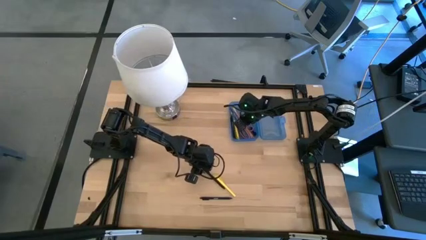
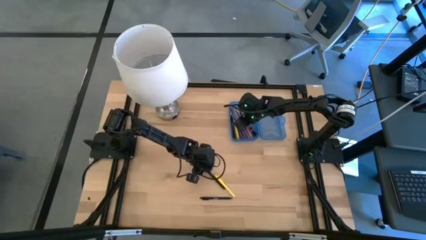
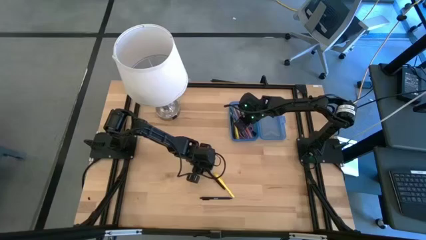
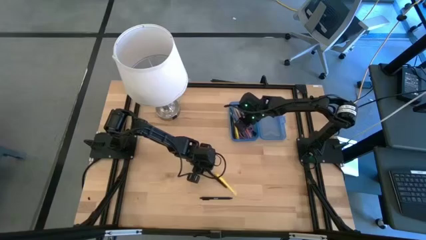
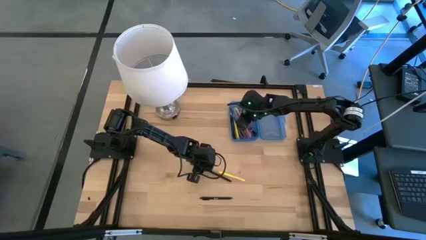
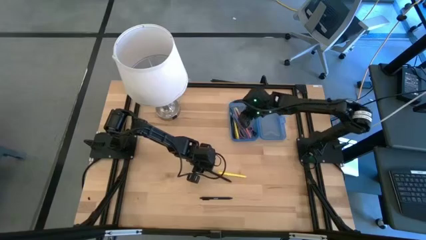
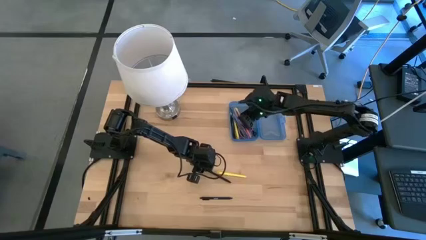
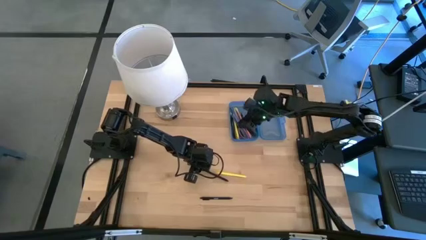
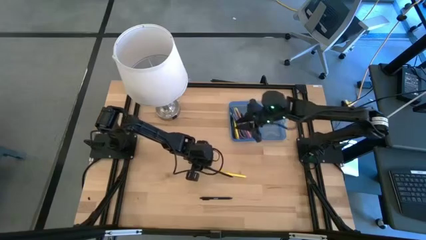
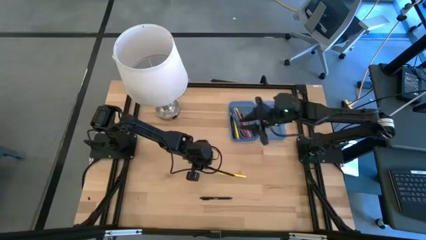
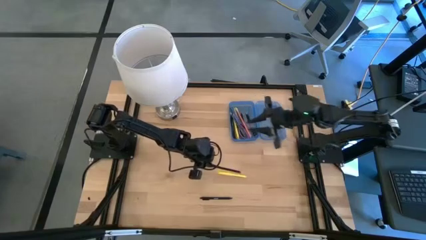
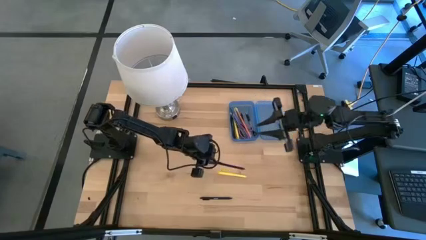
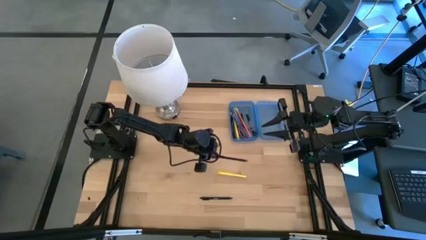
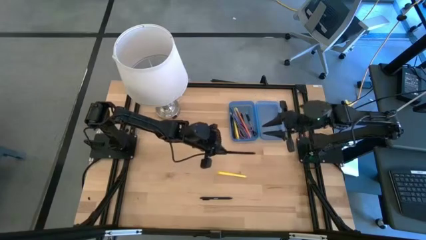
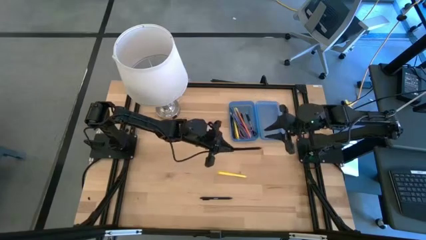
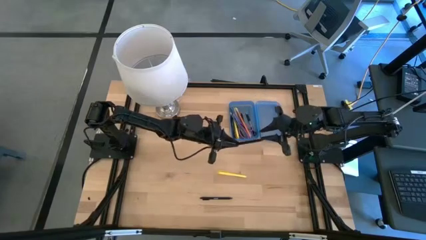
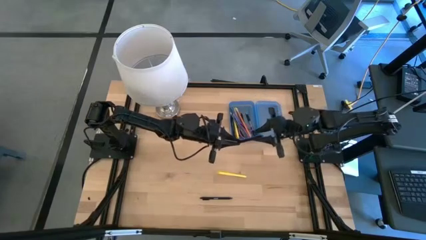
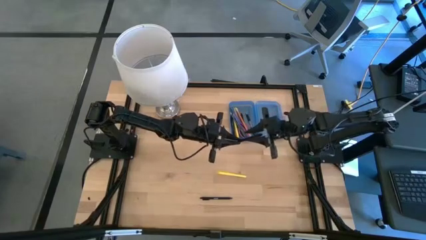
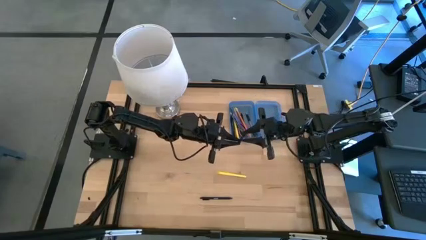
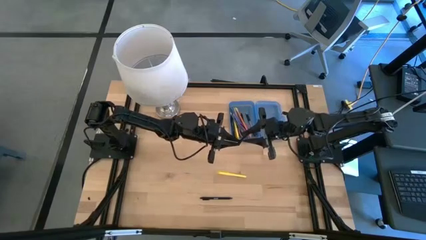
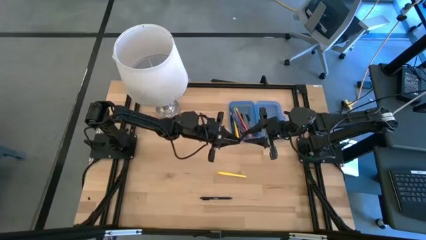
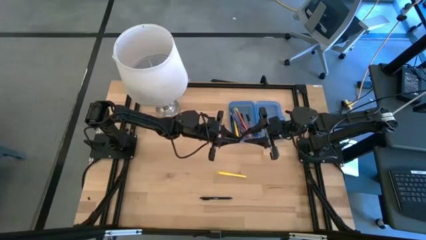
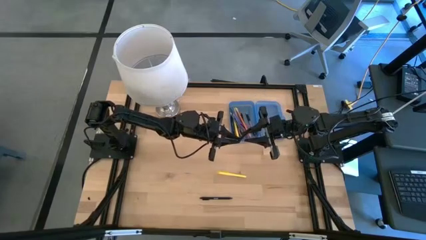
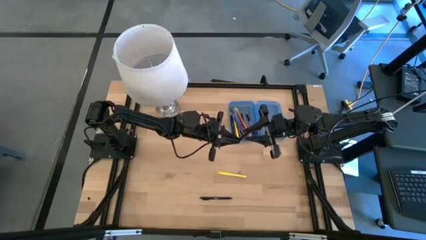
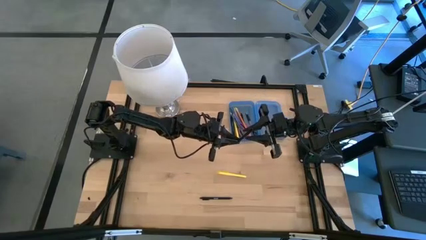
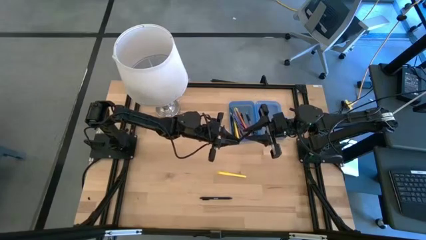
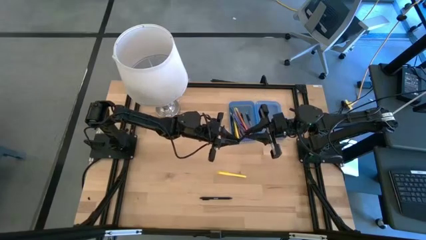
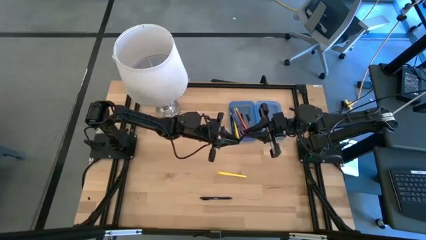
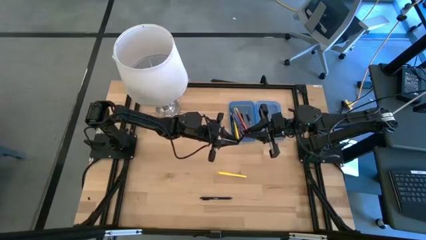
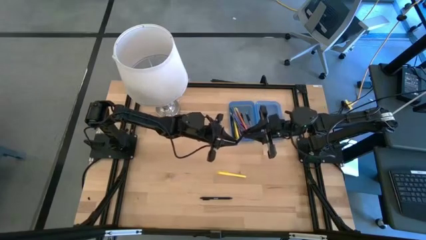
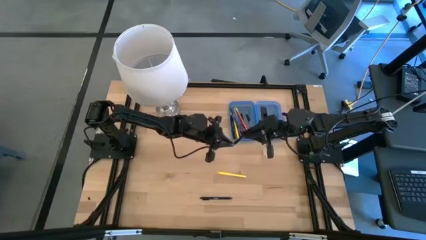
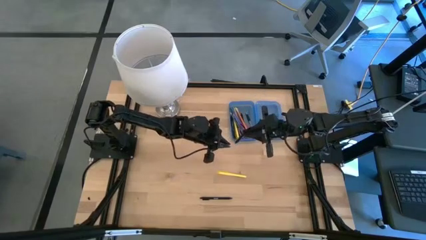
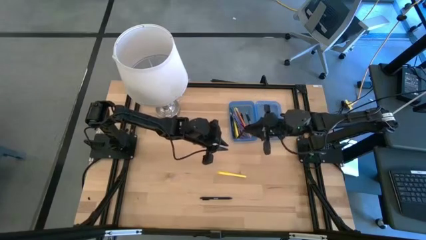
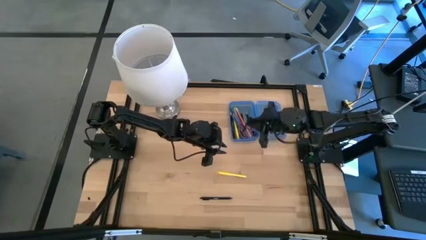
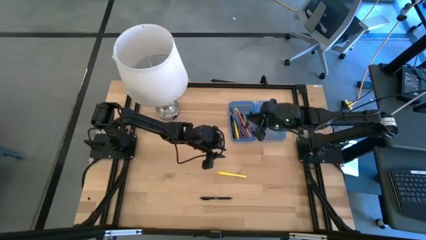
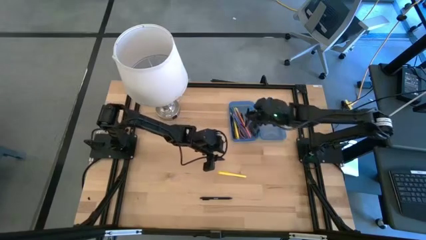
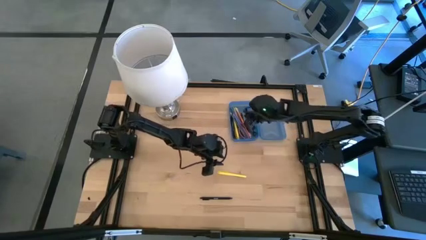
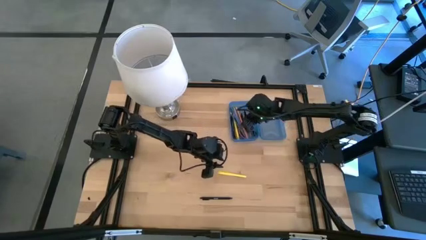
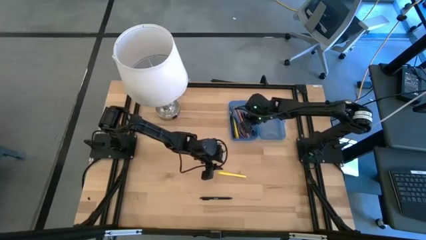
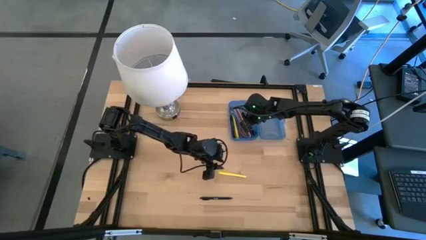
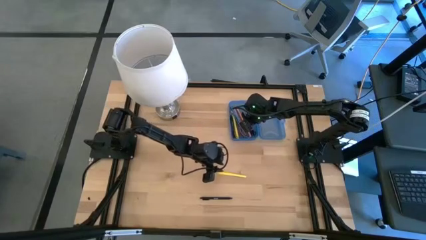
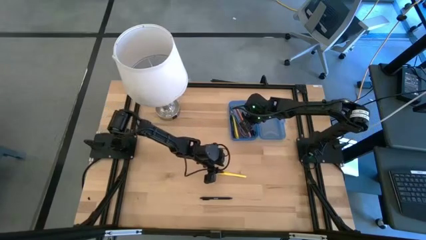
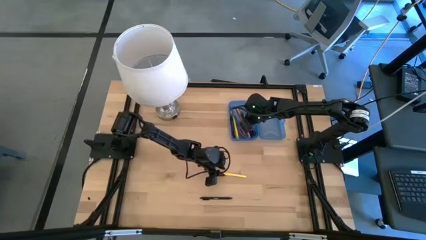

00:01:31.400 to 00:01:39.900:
Task: Pick & place school supplies into a supply box
Put the top black pen into the blue supply box
